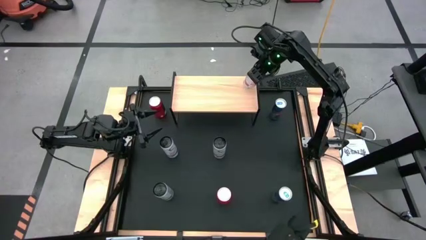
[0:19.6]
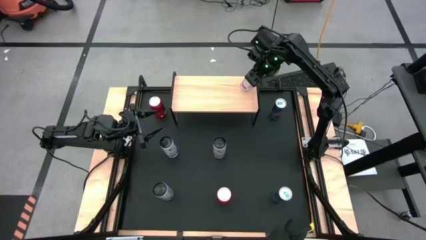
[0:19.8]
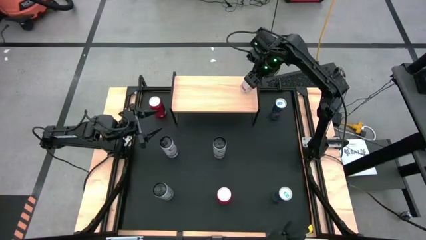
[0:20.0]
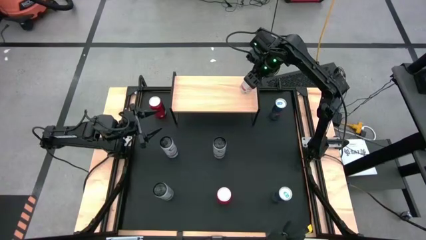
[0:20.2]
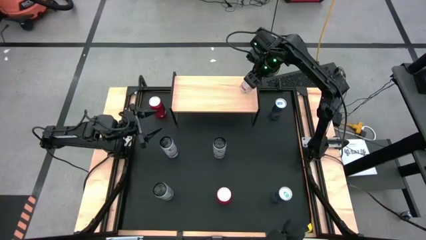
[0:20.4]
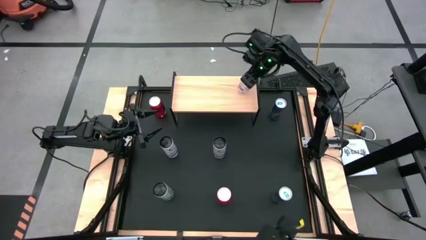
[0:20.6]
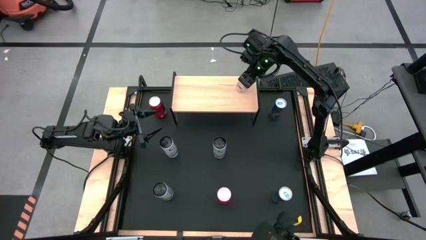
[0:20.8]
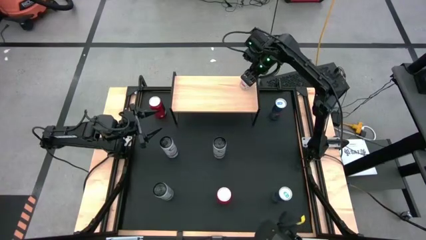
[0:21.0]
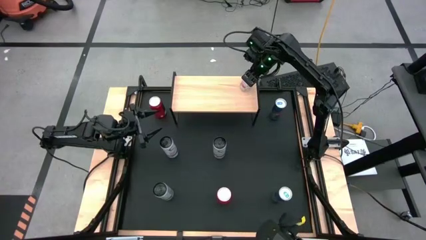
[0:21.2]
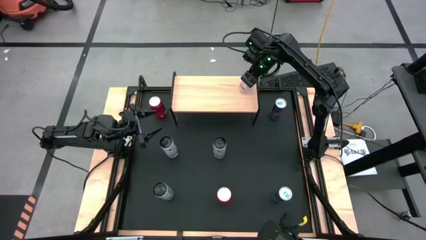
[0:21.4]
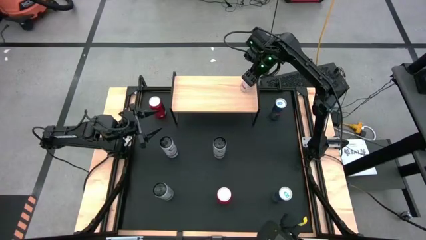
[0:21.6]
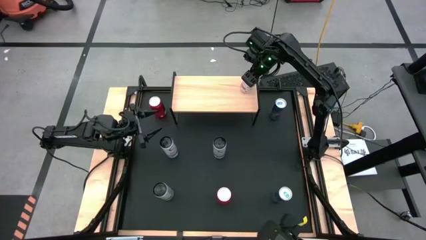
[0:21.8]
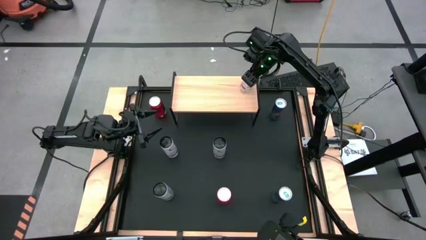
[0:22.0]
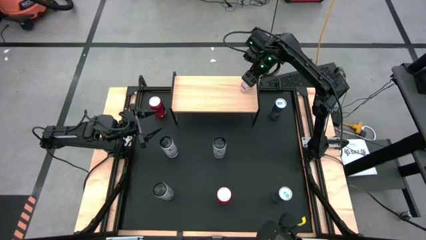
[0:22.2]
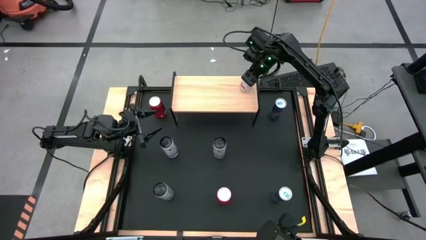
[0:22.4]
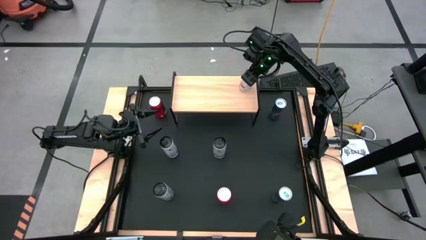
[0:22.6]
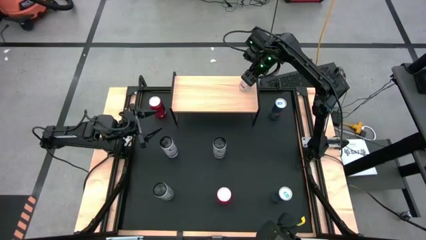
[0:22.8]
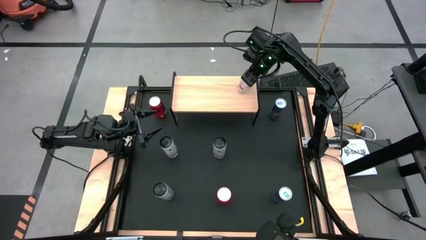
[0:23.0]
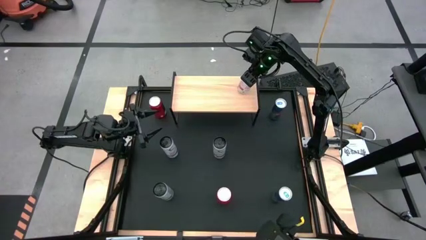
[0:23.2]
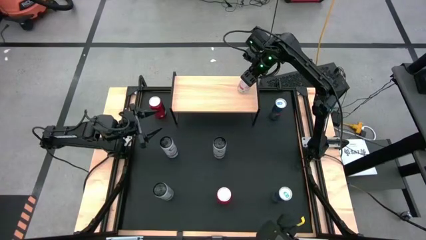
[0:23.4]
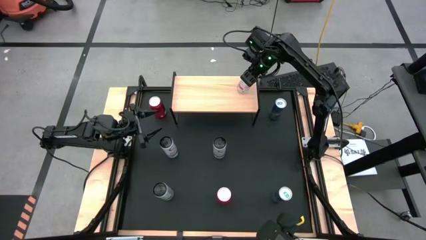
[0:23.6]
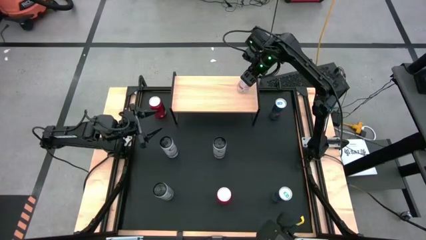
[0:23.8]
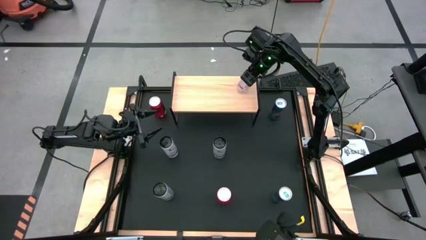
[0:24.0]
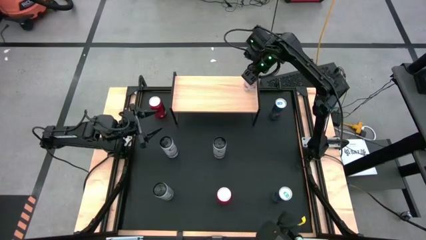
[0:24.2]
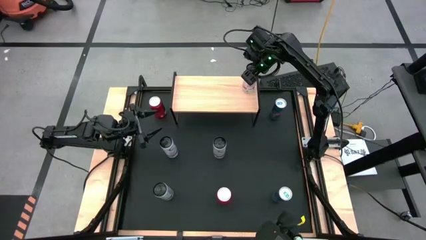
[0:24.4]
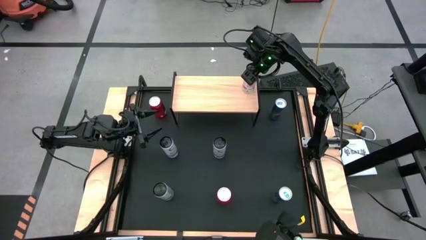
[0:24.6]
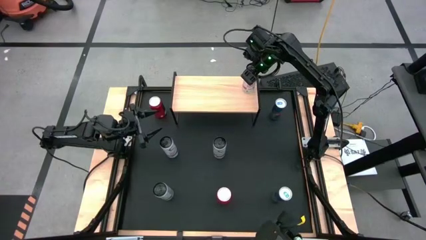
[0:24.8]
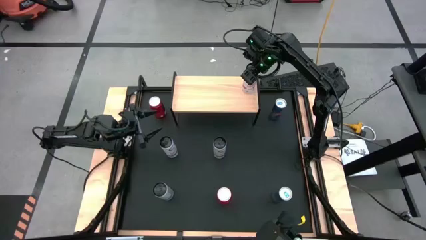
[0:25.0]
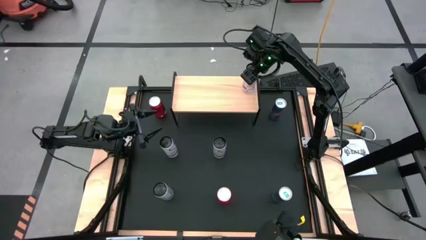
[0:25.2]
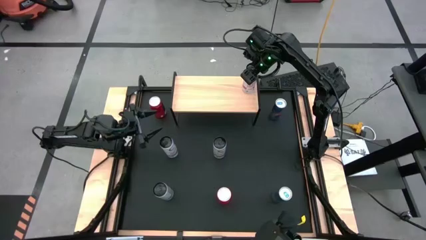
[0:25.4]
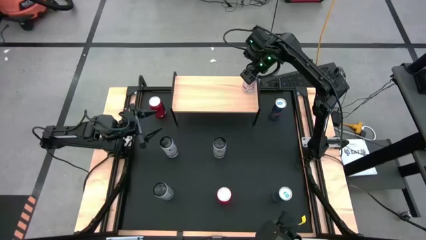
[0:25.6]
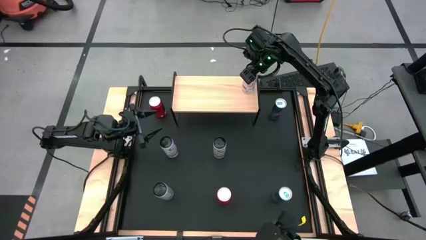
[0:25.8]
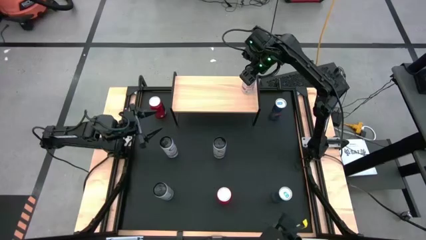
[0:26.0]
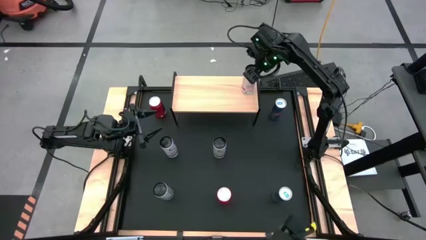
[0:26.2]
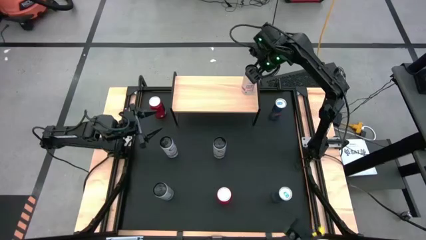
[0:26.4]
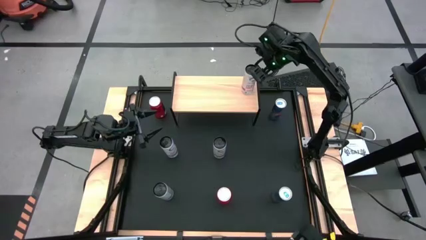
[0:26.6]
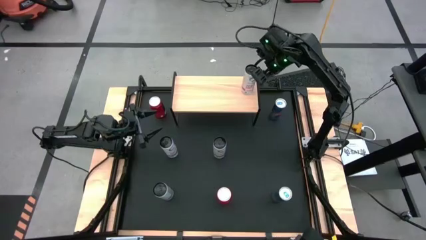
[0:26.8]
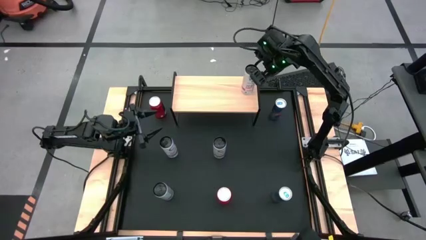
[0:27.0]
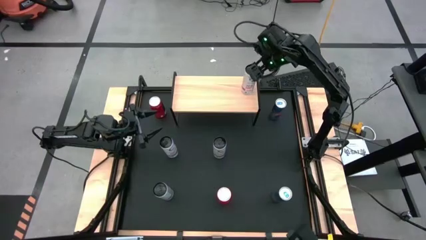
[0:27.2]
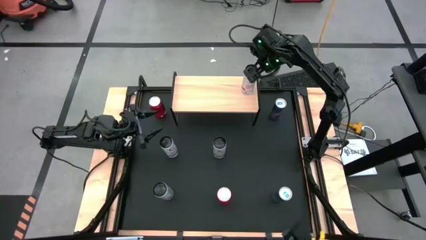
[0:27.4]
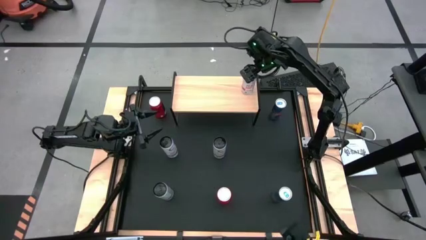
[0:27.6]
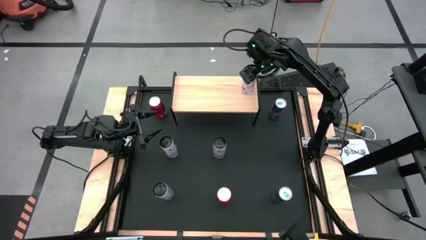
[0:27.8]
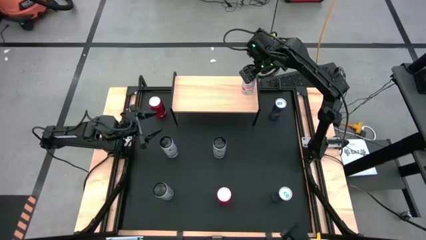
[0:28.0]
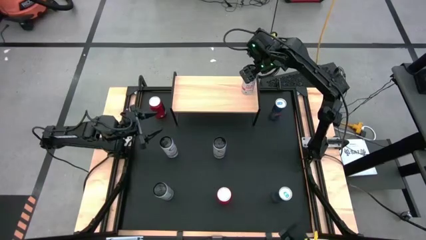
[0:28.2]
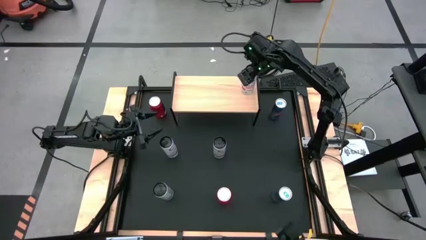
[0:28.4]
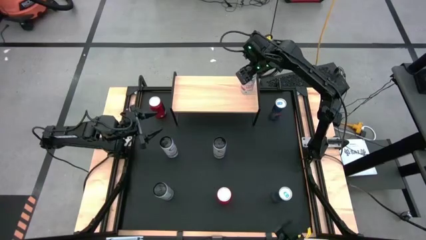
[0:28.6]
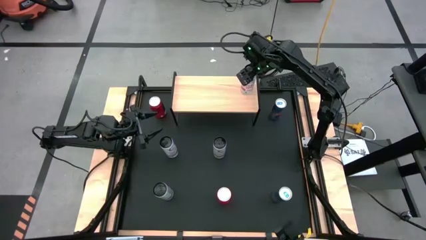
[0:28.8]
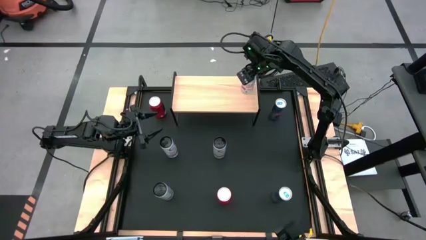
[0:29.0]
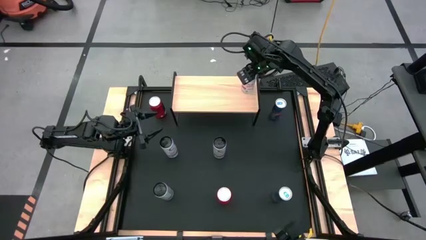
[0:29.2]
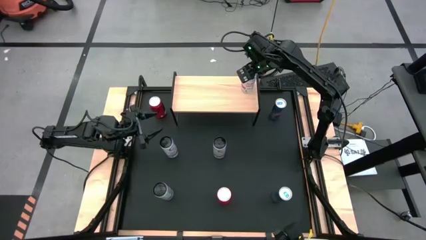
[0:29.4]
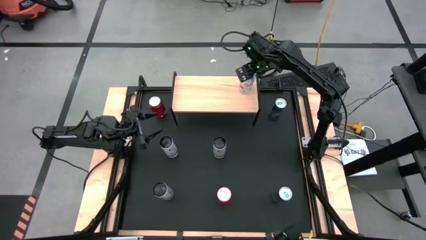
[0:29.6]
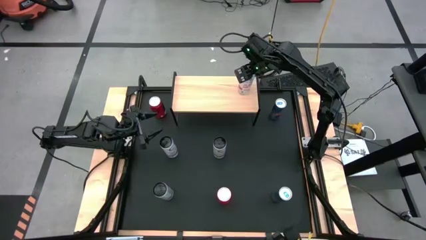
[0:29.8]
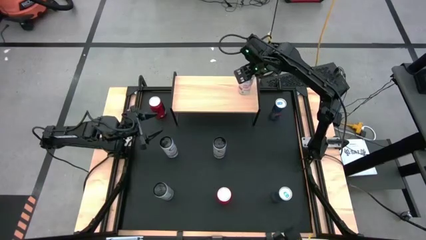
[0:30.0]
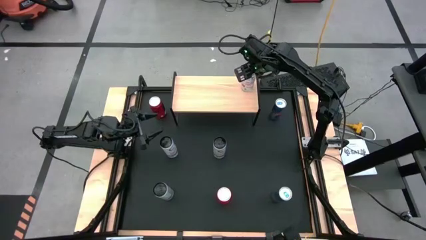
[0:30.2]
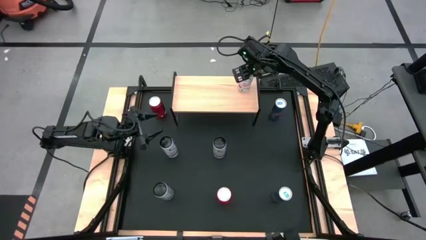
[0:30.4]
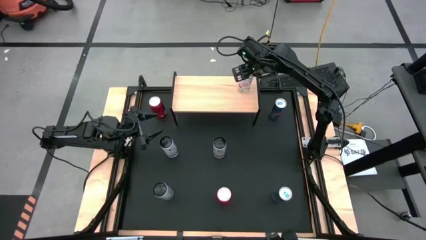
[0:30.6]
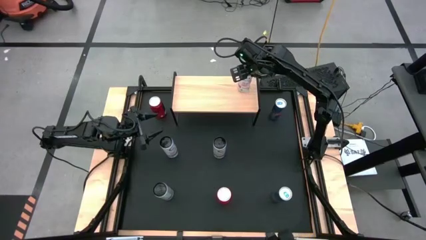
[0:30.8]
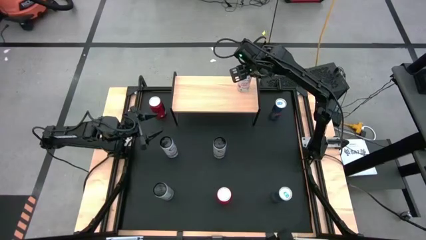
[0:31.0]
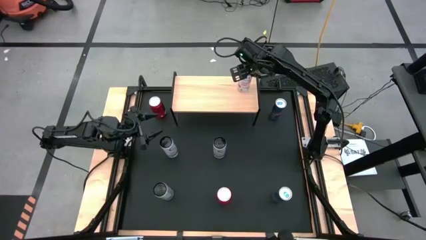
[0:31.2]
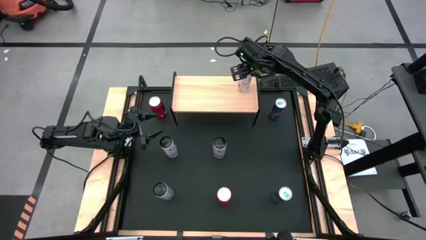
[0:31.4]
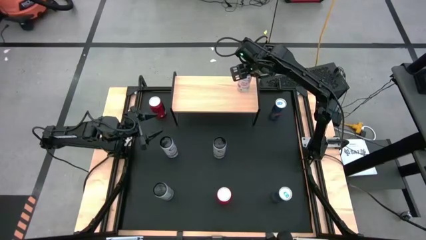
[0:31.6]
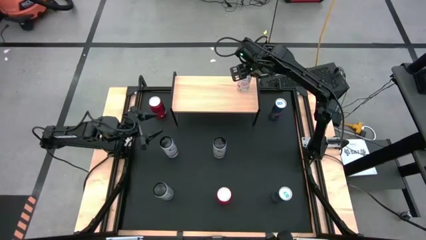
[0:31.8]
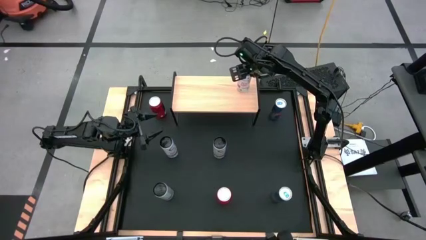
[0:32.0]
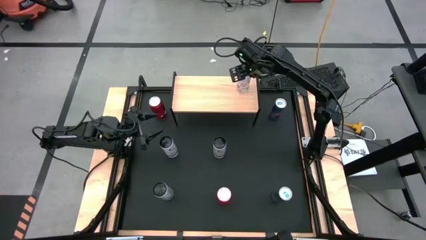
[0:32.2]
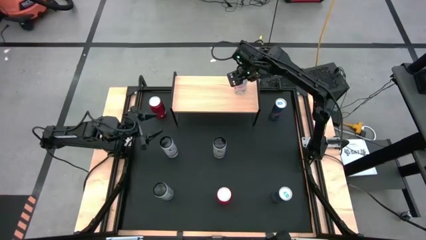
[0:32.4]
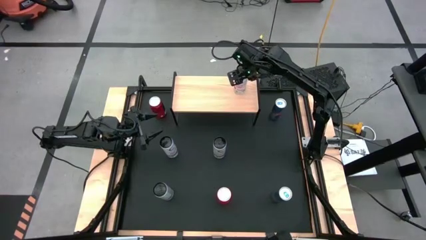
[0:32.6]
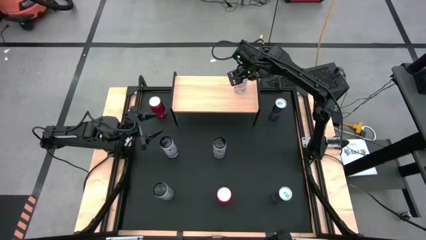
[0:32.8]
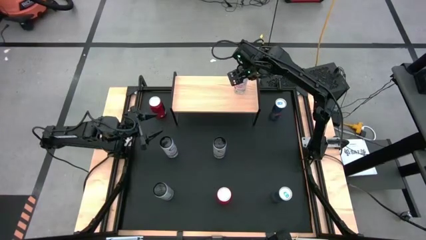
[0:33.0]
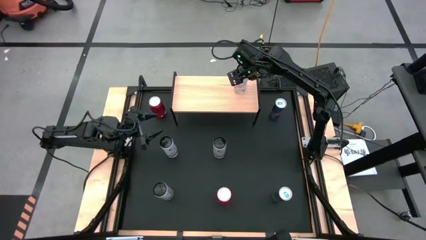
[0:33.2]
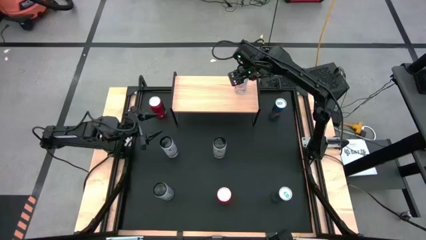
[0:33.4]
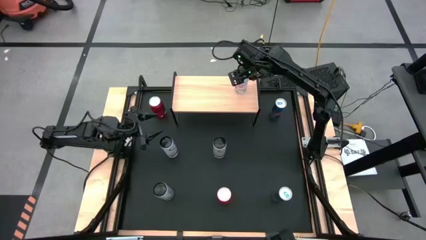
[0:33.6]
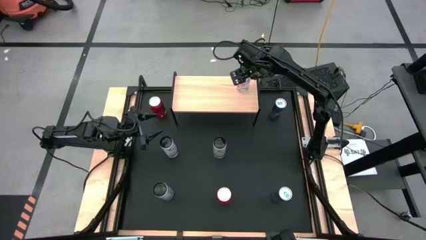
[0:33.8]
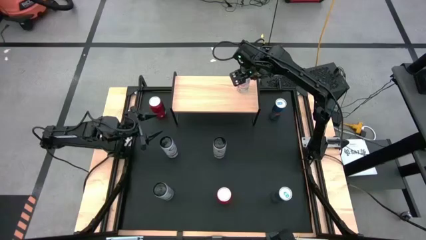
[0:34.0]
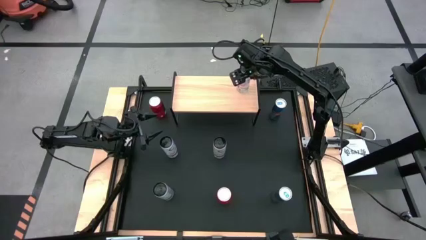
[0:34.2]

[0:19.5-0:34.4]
Task: Place canned beverage on shelf
Put the right white pink soda can on the shelf

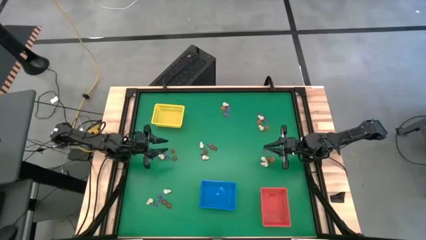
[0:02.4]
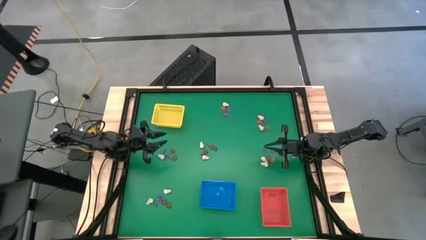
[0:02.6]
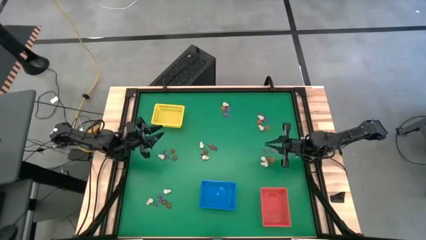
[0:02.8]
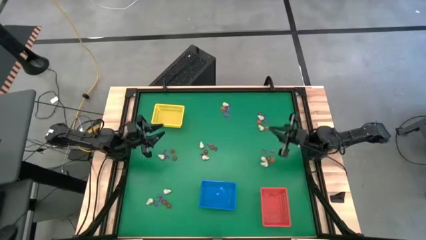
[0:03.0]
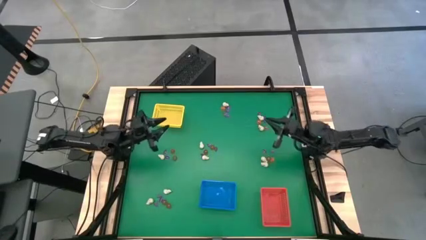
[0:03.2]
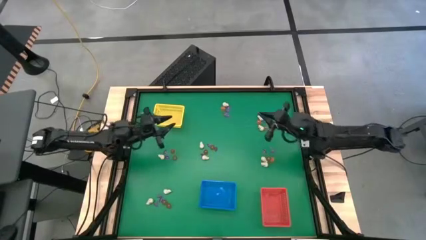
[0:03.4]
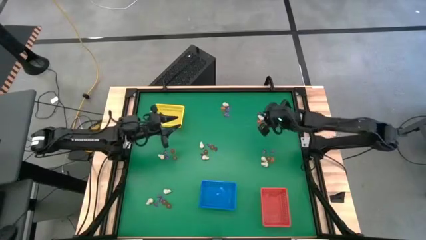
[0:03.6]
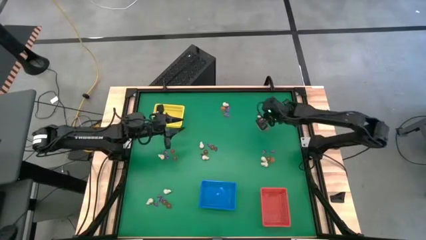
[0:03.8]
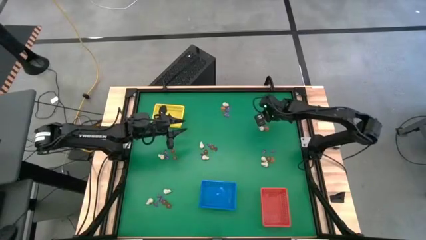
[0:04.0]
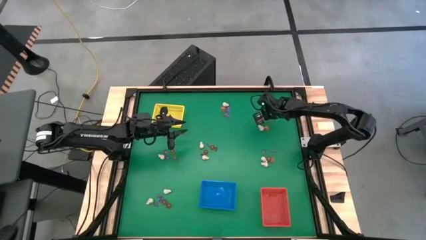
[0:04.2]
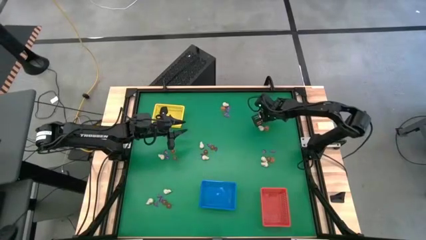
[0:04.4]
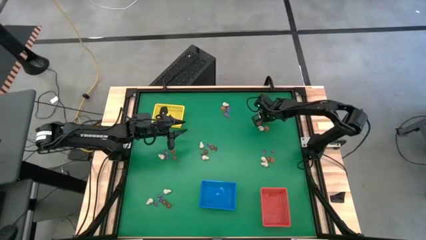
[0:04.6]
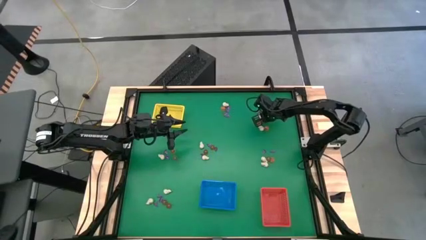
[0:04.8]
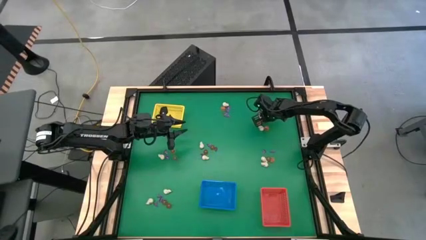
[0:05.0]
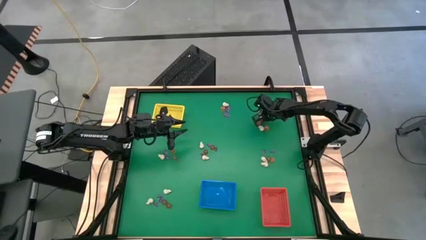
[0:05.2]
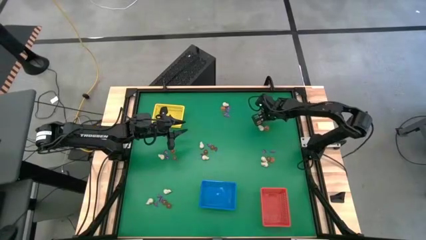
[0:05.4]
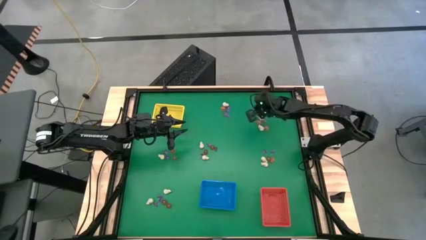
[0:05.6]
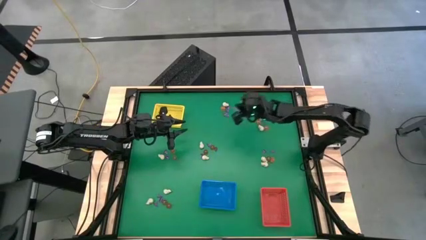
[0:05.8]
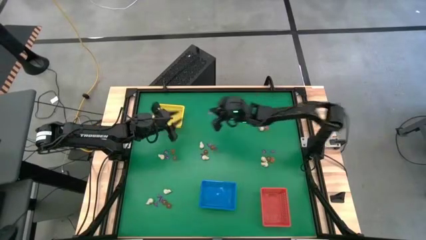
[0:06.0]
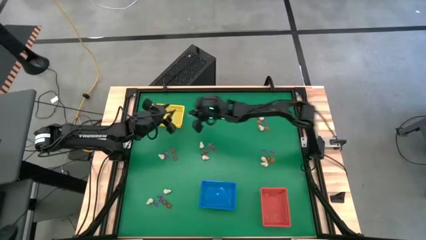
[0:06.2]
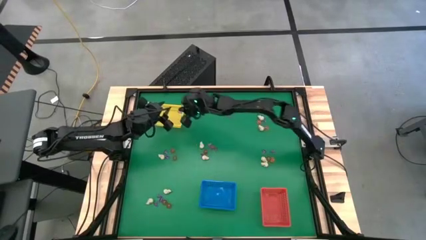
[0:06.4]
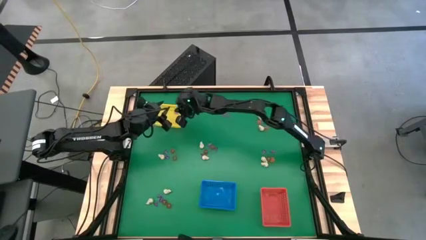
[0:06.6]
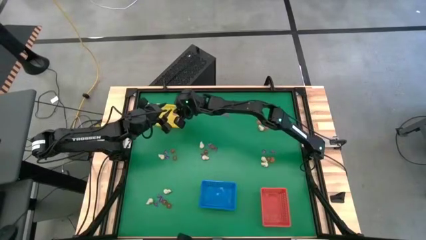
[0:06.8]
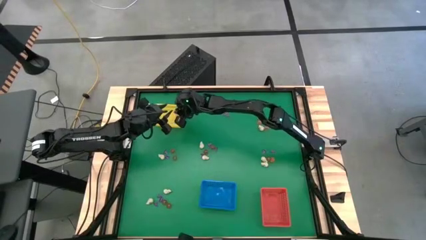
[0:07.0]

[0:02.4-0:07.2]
Task: Sort Halloween decoration
Put the purple witch hat toy into the yellow basket
